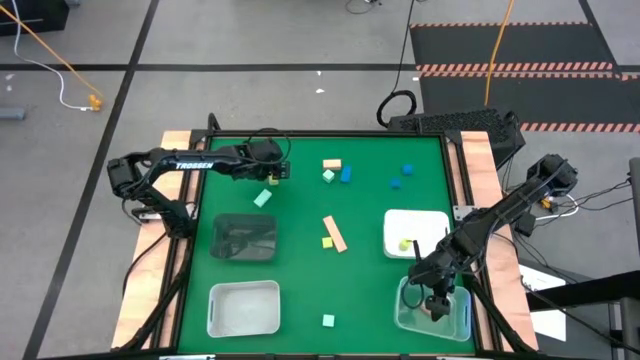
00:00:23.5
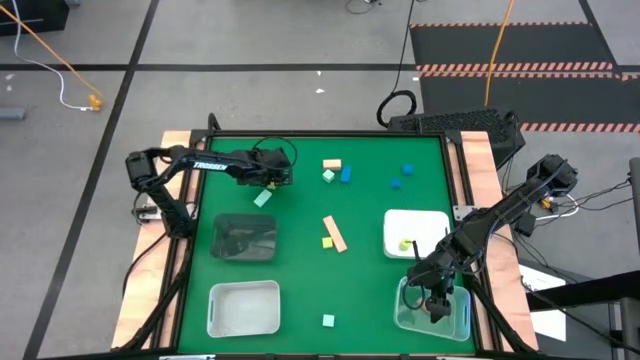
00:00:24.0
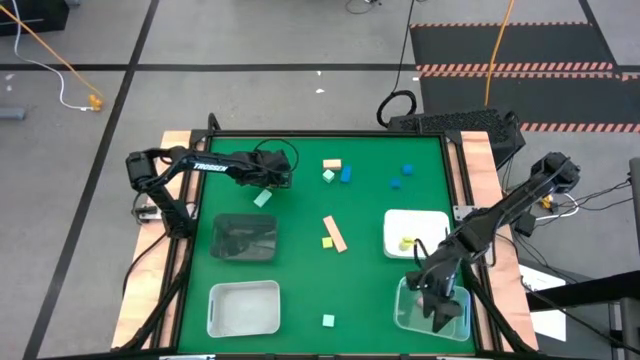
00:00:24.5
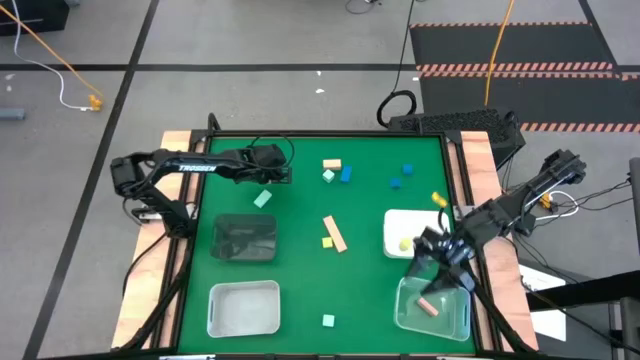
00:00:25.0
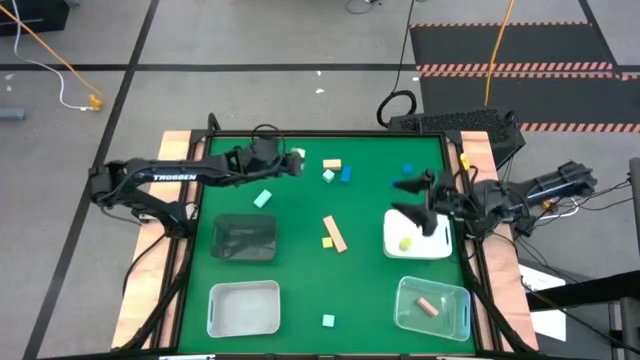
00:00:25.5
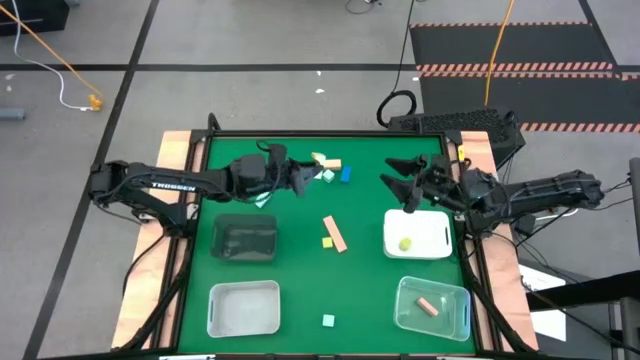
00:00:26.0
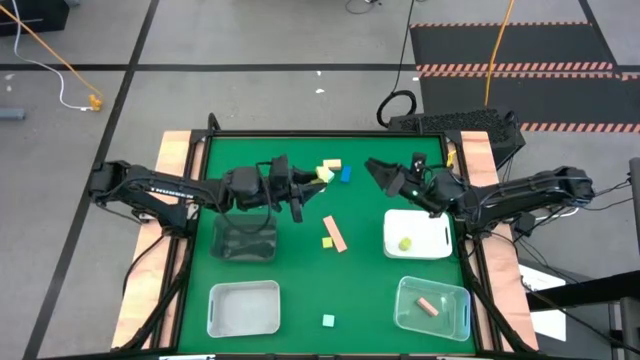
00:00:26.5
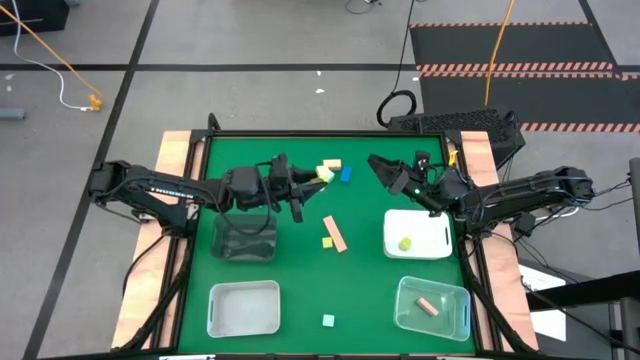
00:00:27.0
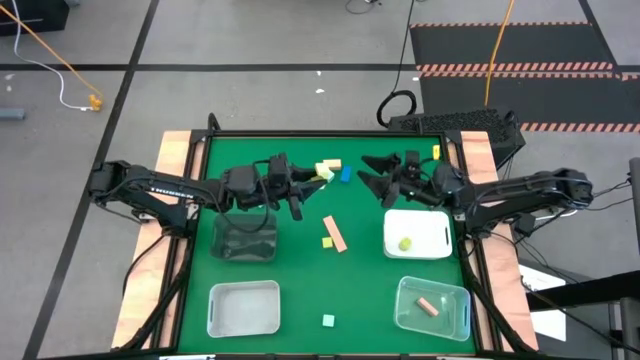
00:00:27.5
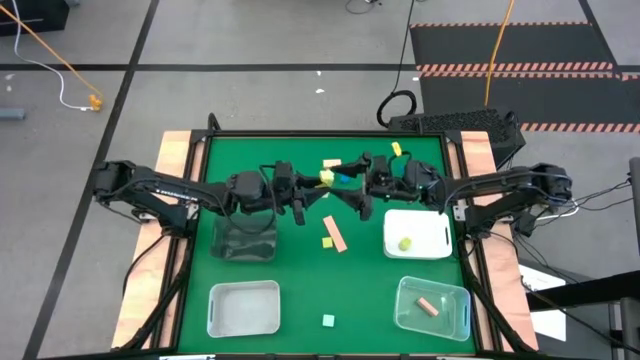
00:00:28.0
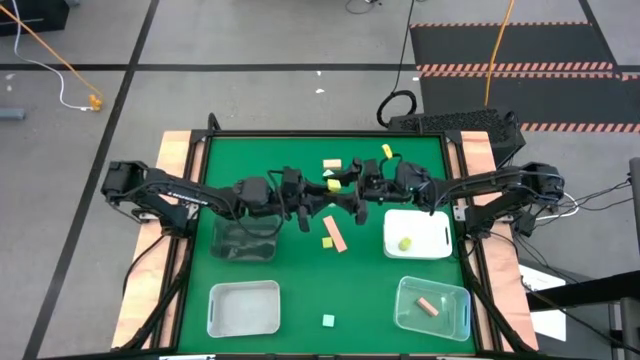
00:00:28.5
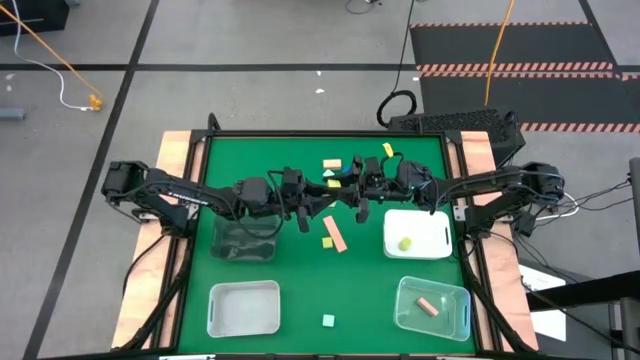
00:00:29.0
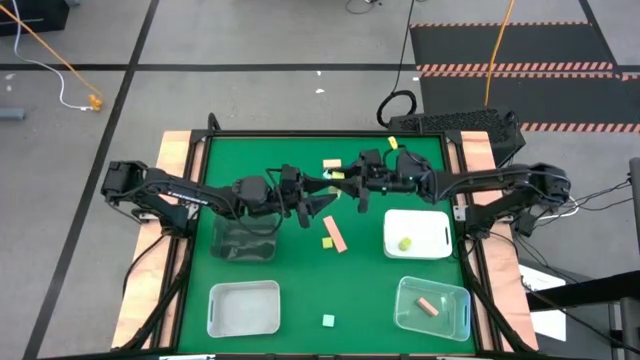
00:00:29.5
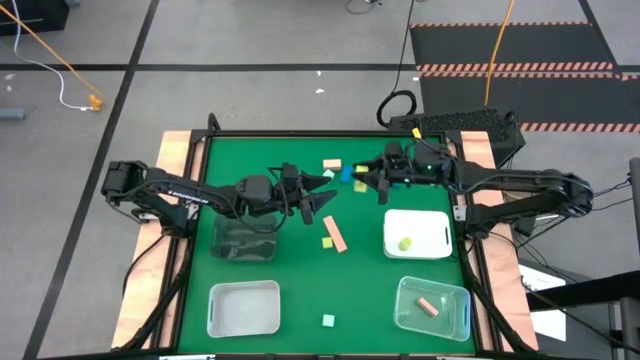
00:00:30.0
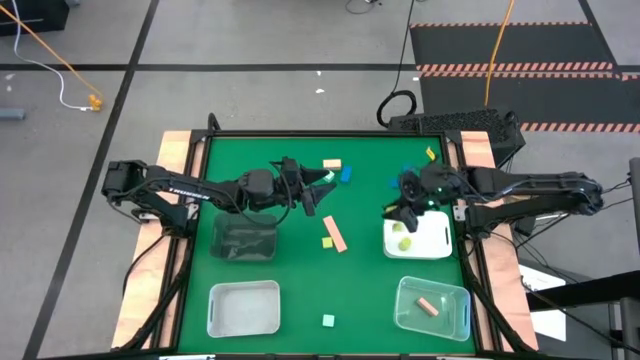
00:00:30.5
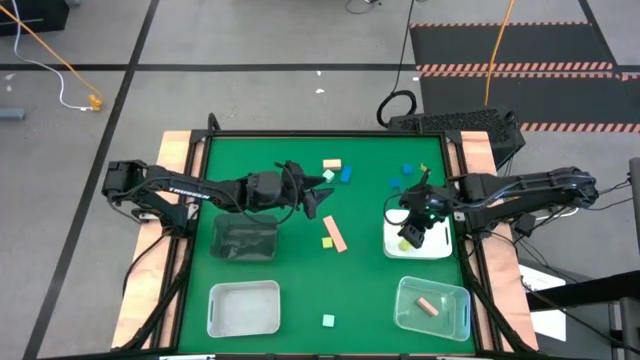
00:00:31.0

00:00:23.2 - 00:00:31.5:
Task: Sort & place blocks by color
Put the top green block into the white bin

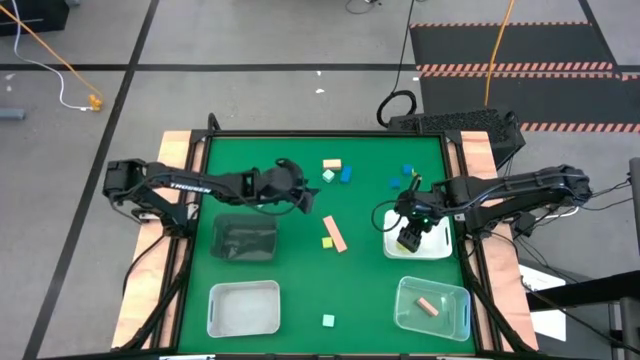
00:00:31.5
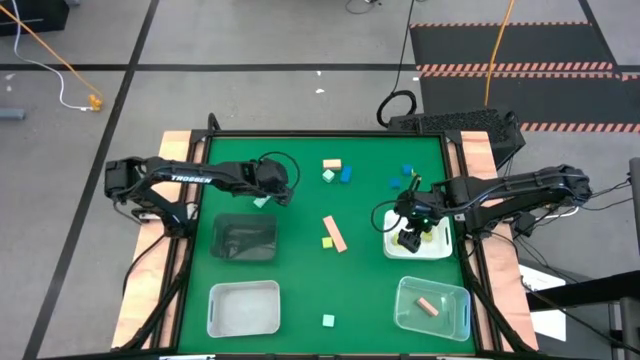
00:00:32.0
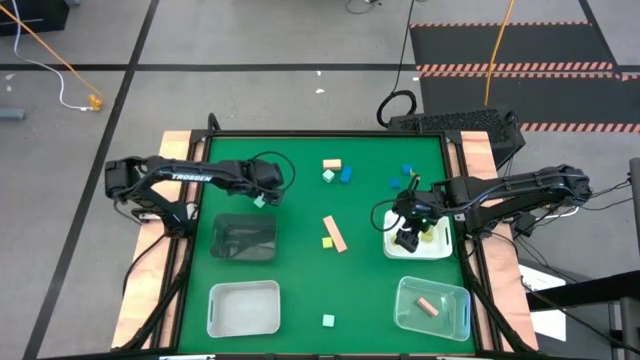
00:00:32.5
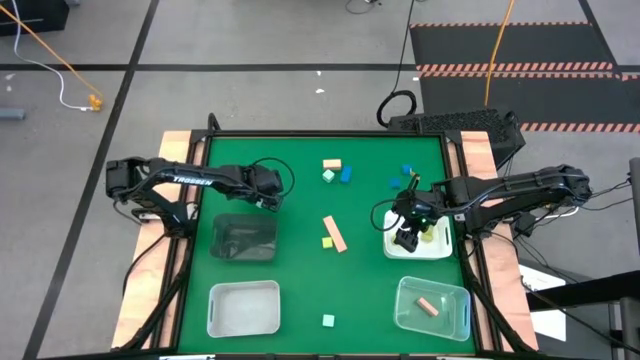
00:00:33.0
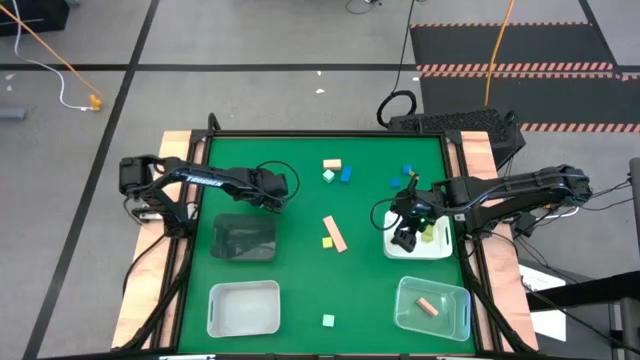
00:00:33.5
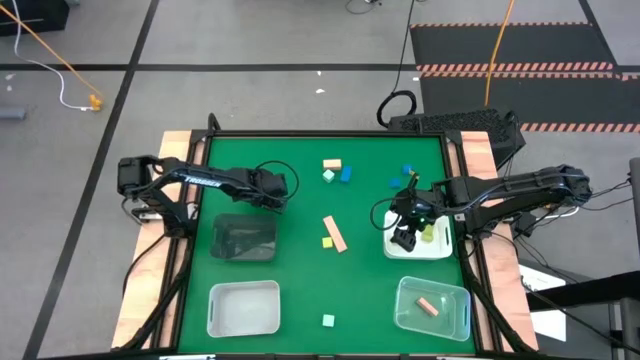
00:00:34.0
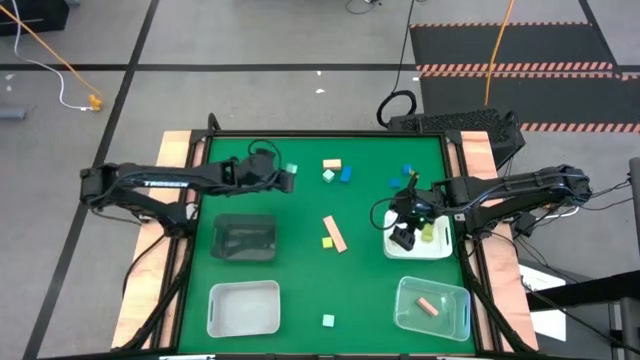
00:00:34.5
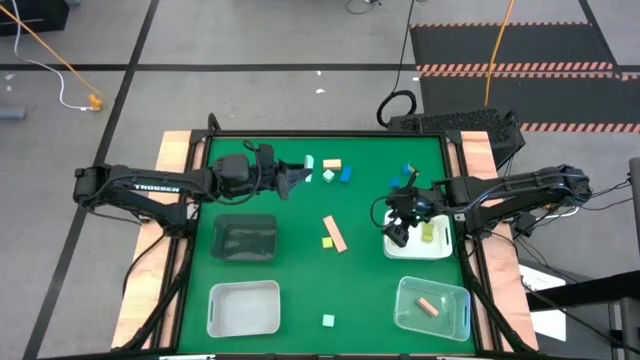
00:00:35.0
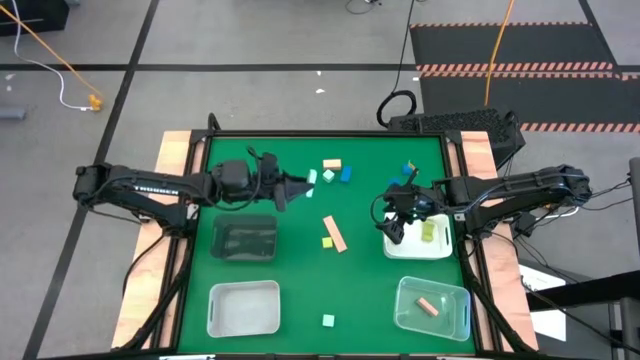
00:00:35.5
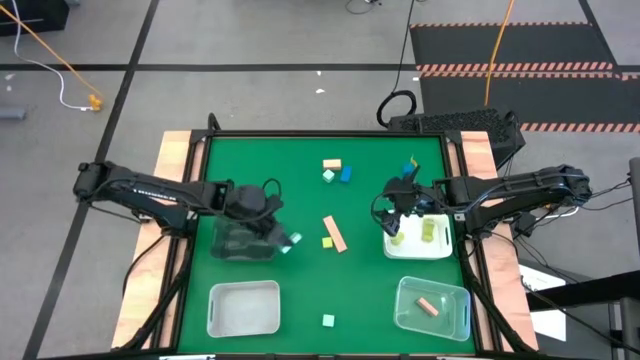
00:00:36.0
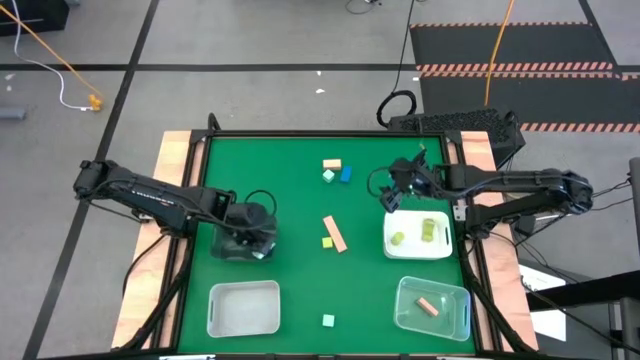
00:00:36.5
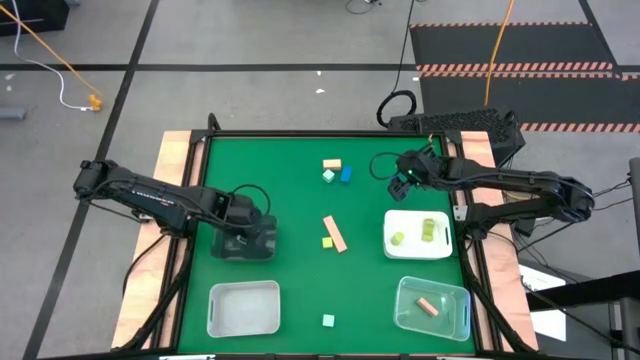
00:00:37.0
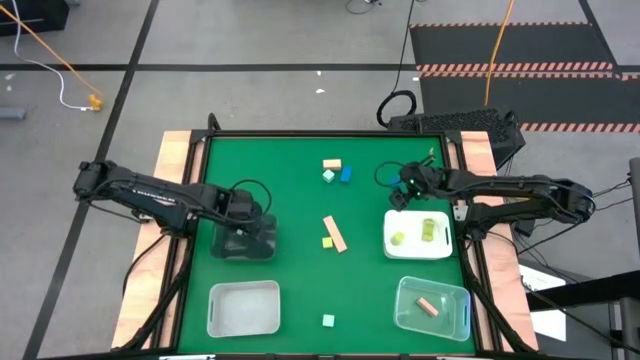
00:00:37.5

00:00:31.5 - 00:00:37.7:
Put the top left light blue block into the black bin

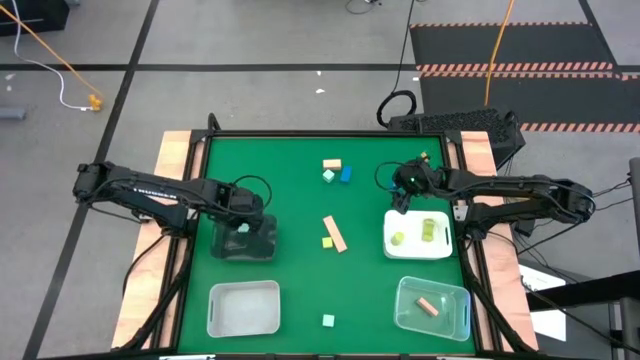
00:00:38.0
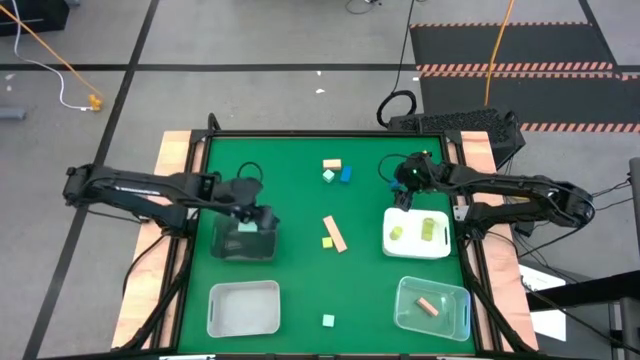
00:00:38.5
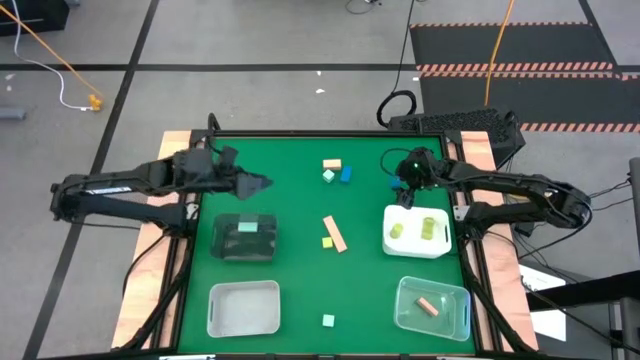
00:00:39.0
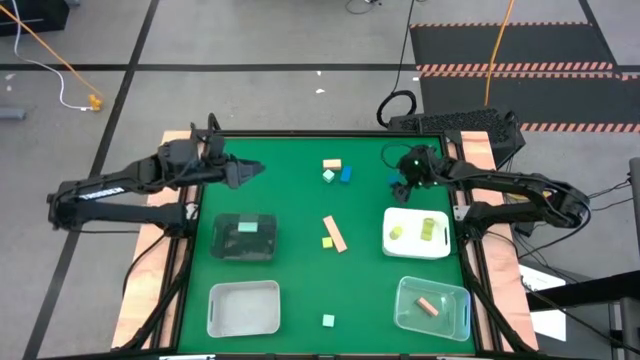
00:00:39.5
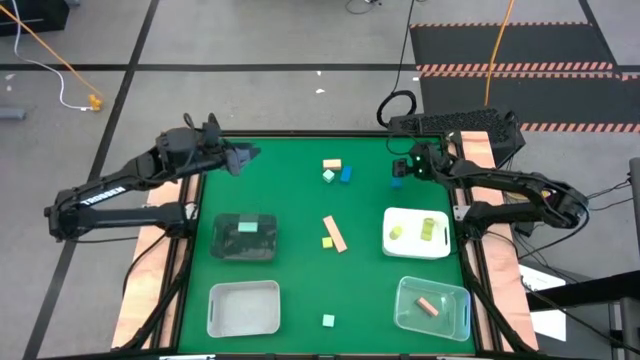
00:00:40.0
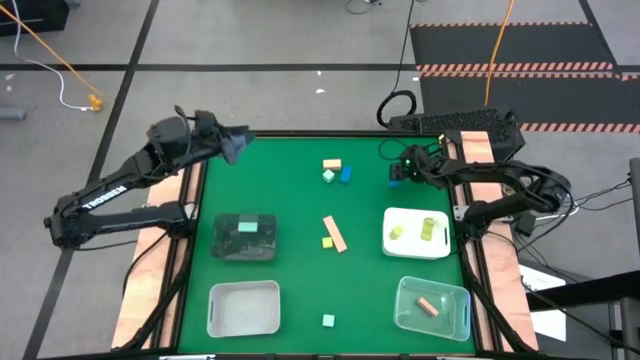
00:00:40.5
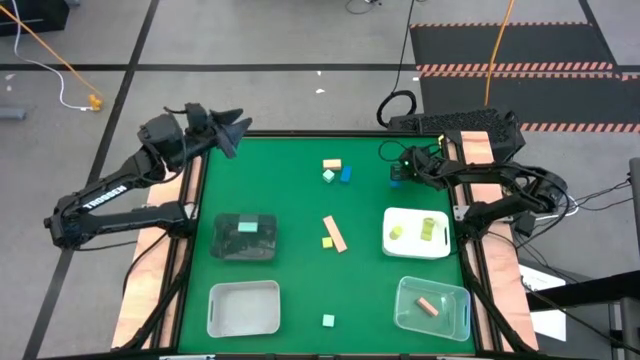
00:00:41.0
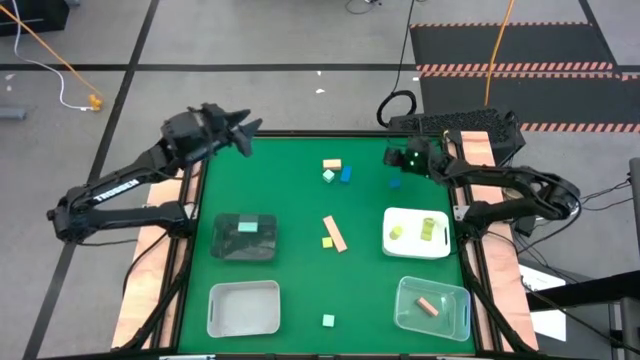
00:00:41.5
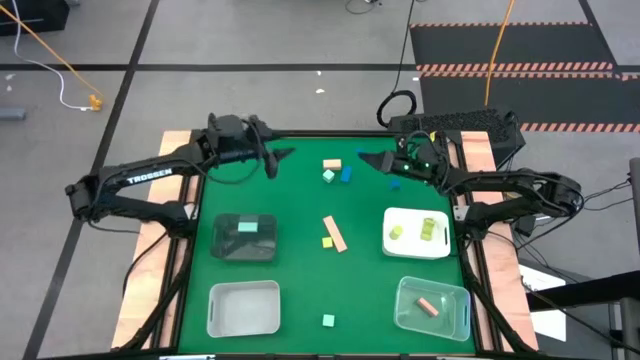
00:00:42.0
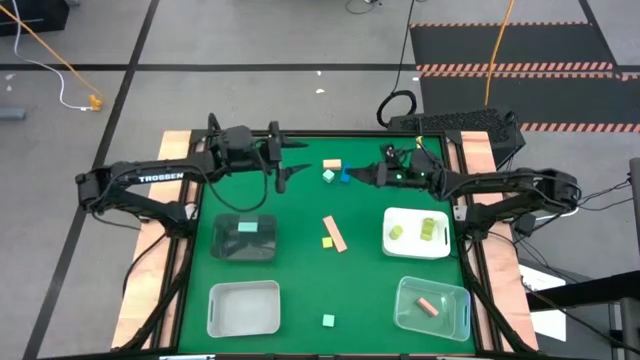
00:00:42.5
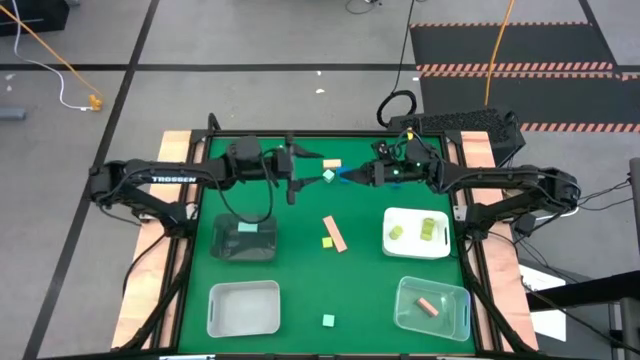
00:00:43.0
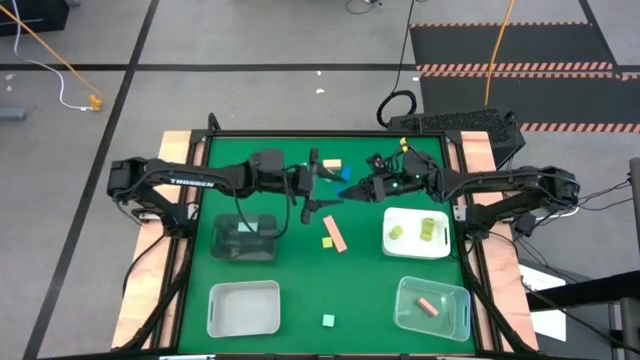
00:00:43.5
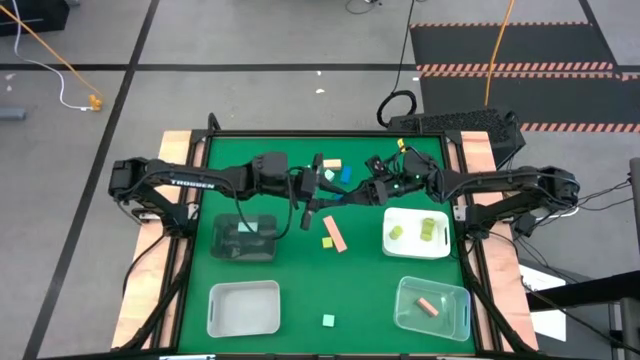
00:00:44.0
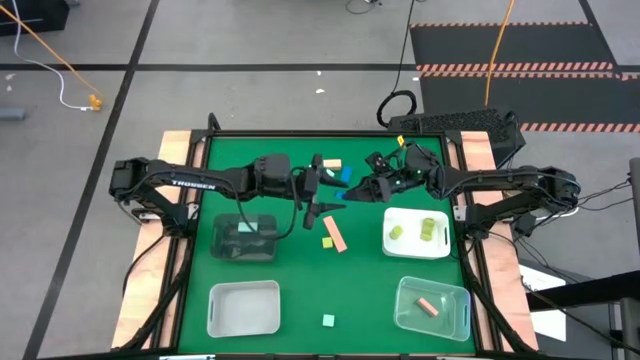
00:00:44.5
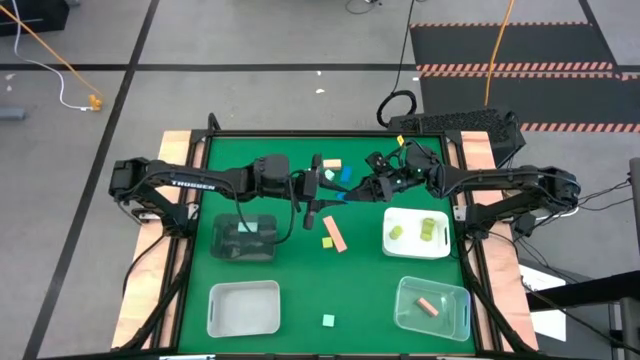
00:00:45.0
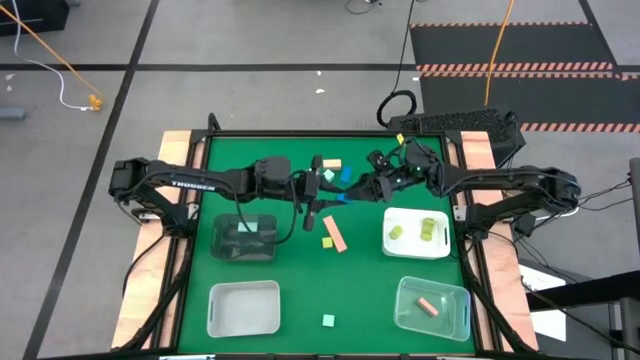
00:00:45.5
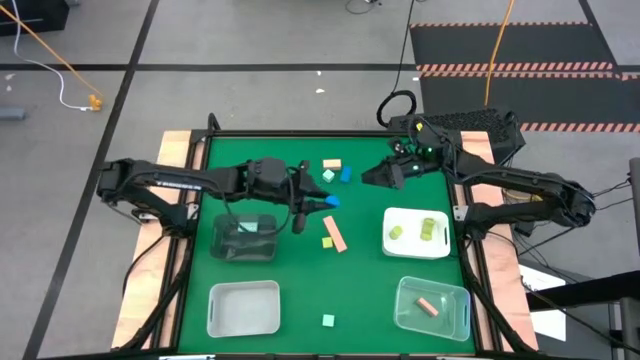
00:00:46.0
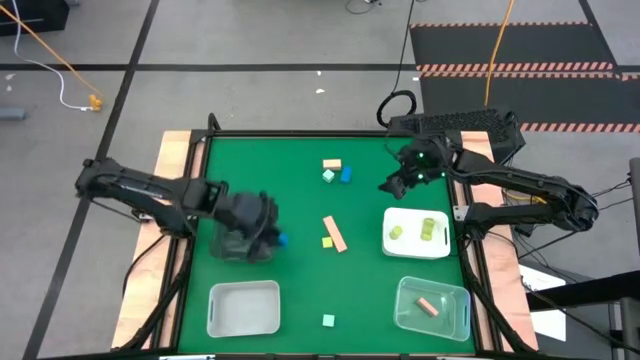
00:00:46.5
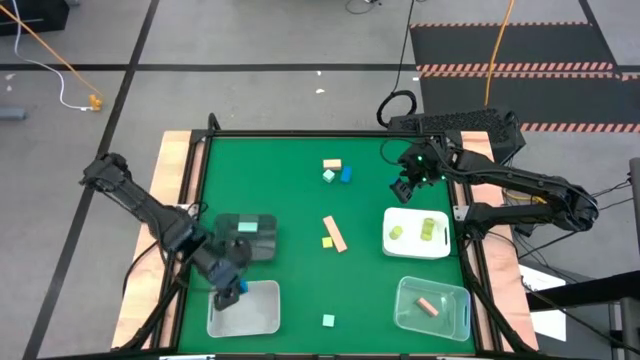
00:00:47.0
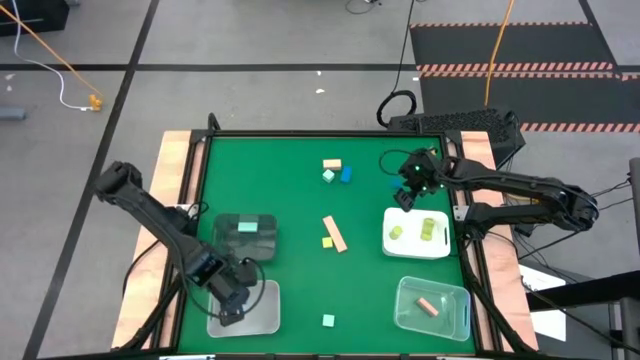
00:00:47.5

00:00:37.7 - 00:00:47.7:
Put the right blue block into the gray bin
